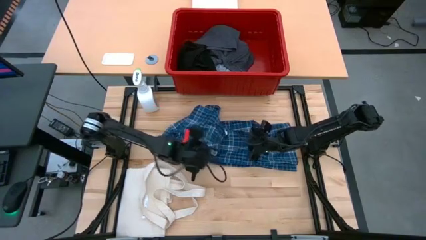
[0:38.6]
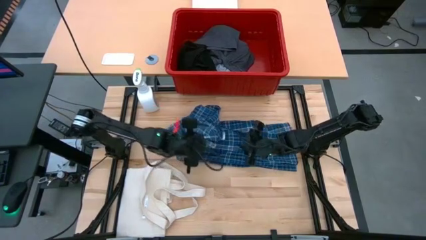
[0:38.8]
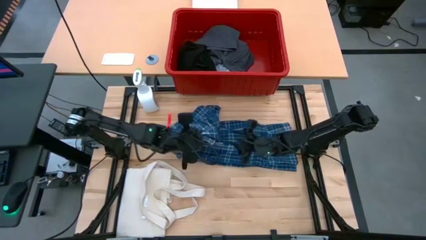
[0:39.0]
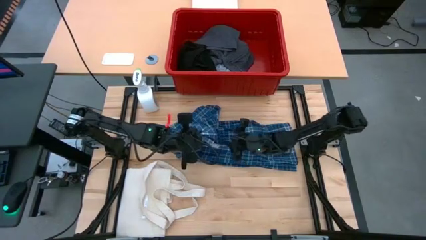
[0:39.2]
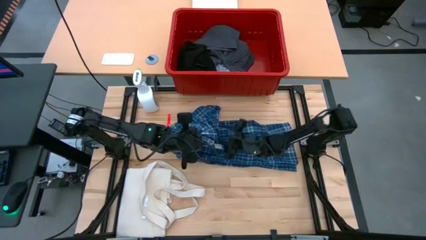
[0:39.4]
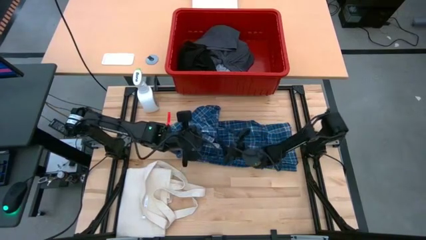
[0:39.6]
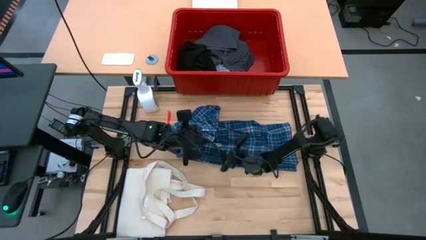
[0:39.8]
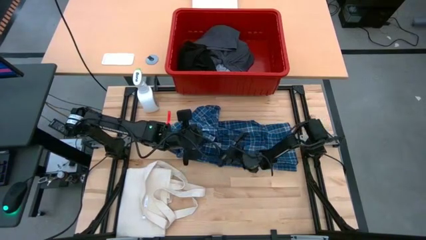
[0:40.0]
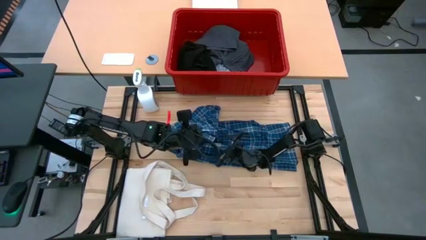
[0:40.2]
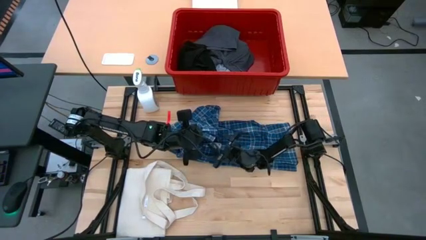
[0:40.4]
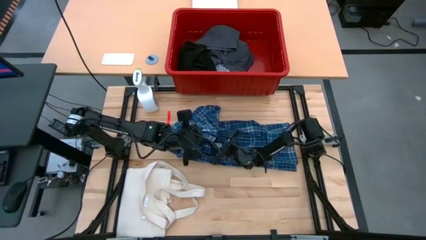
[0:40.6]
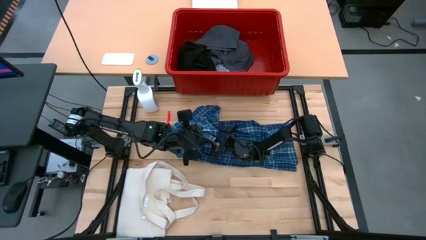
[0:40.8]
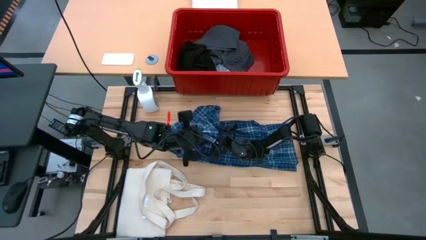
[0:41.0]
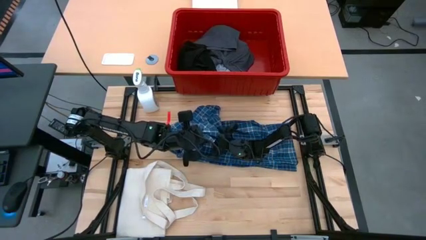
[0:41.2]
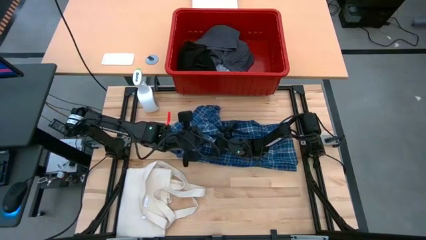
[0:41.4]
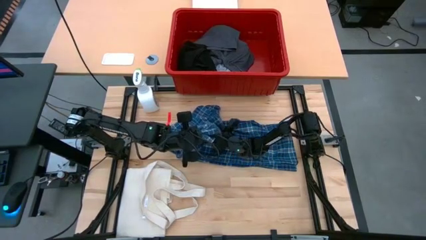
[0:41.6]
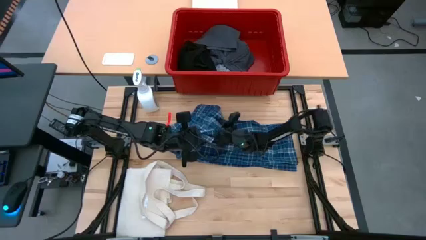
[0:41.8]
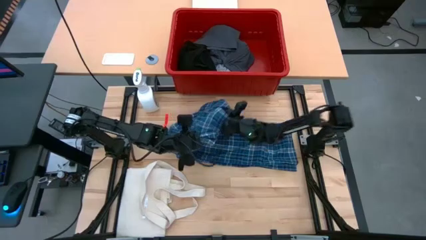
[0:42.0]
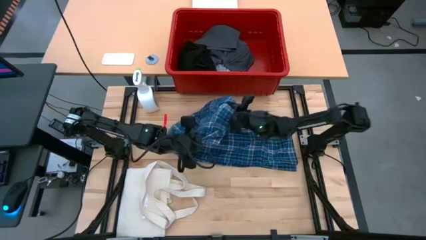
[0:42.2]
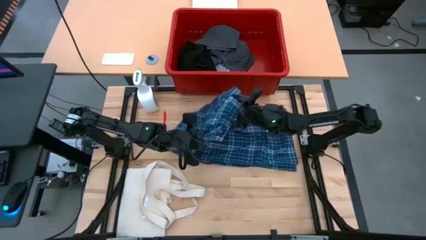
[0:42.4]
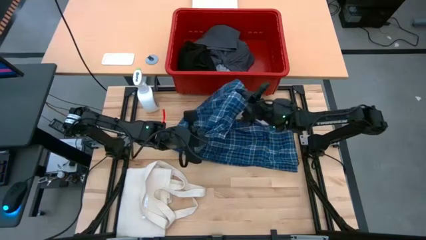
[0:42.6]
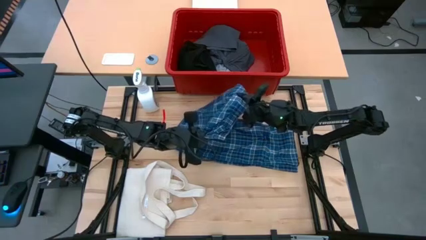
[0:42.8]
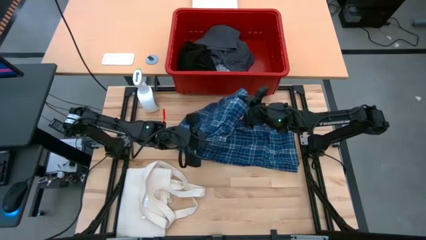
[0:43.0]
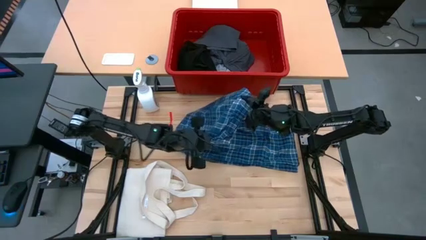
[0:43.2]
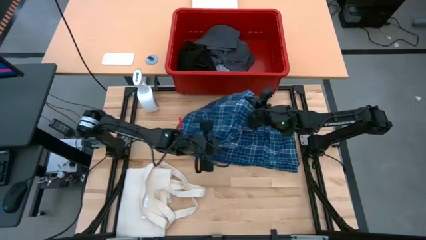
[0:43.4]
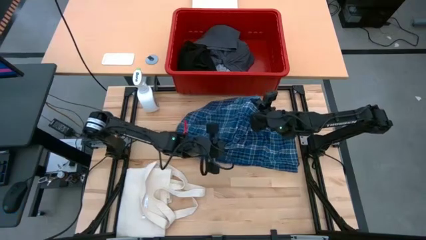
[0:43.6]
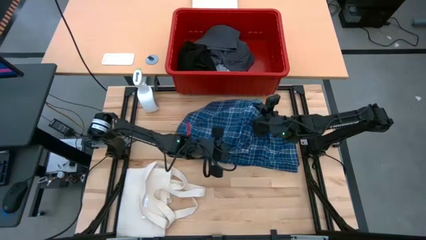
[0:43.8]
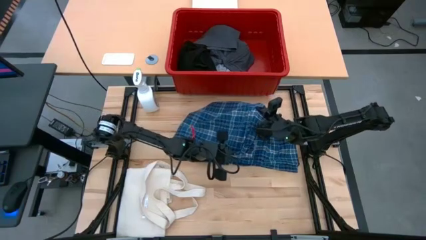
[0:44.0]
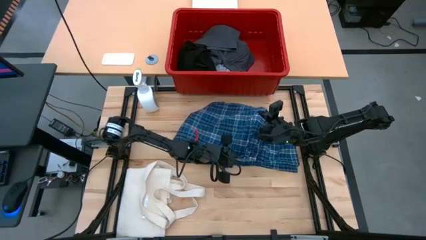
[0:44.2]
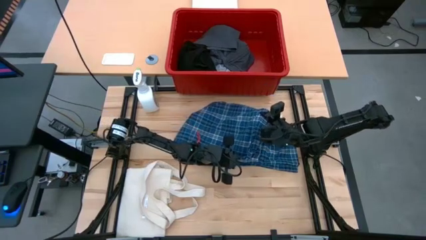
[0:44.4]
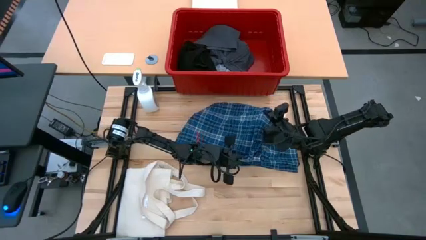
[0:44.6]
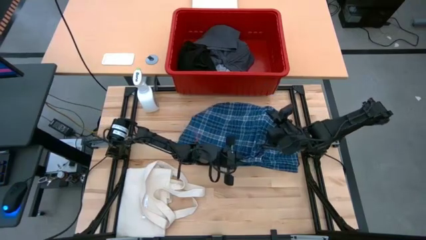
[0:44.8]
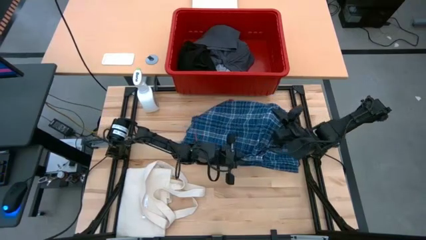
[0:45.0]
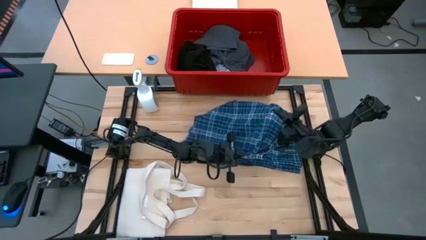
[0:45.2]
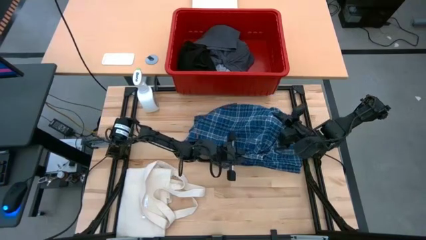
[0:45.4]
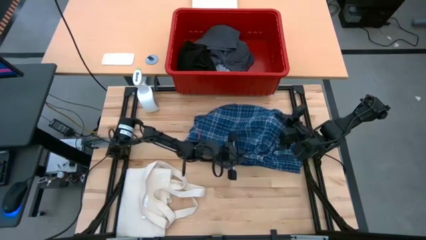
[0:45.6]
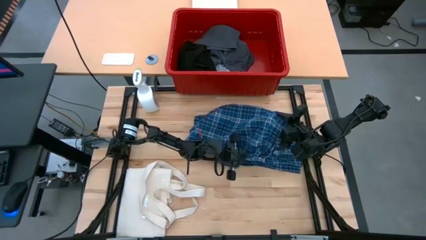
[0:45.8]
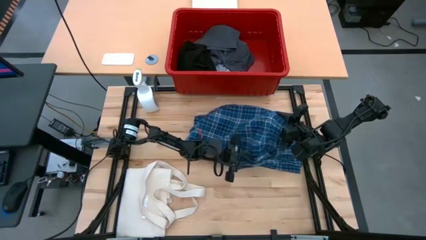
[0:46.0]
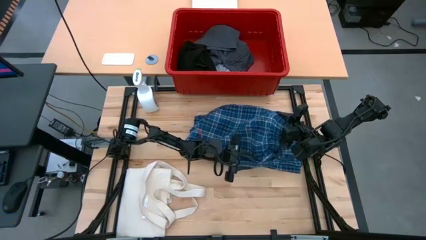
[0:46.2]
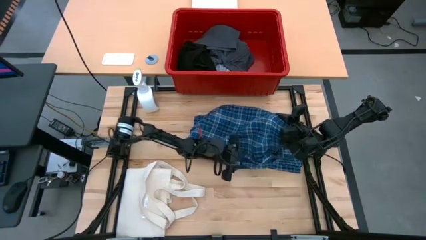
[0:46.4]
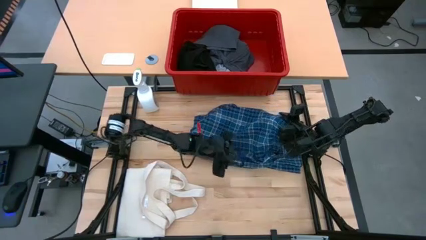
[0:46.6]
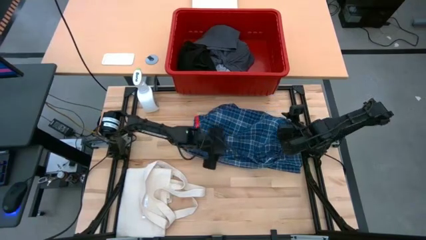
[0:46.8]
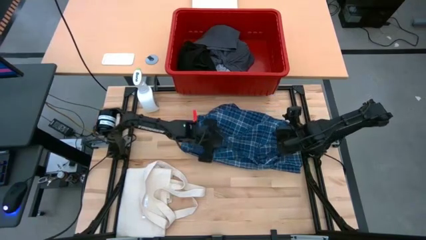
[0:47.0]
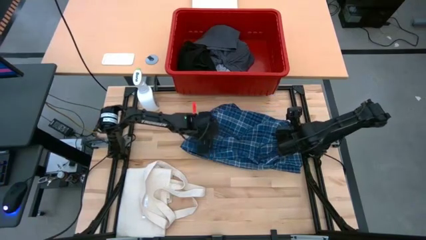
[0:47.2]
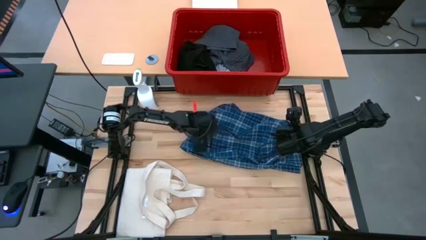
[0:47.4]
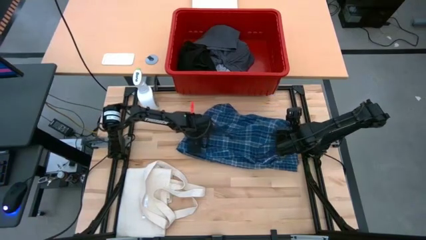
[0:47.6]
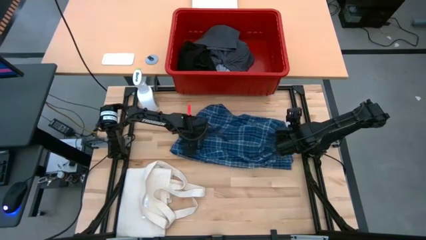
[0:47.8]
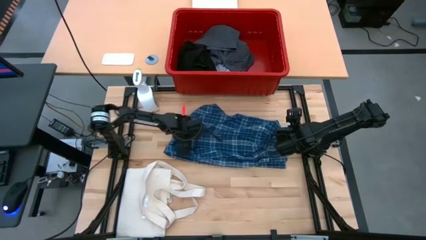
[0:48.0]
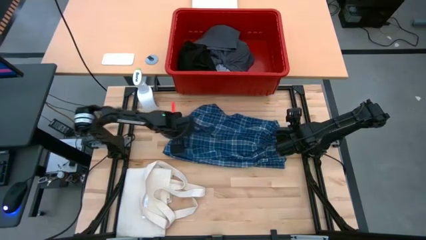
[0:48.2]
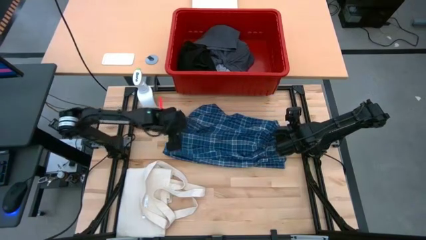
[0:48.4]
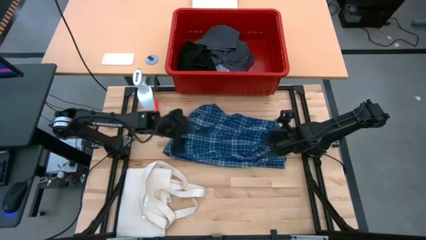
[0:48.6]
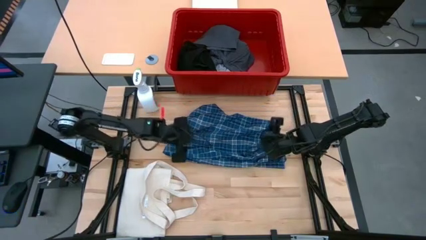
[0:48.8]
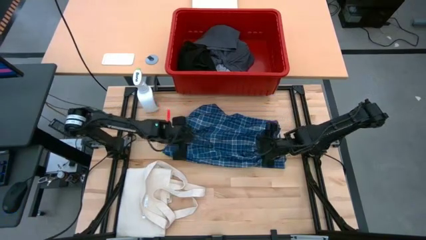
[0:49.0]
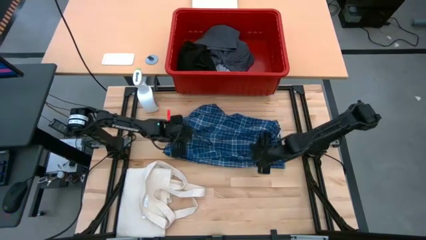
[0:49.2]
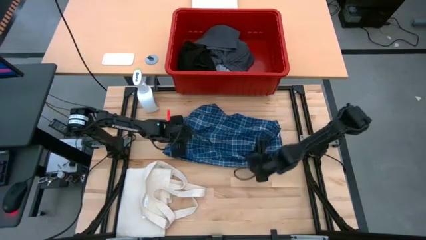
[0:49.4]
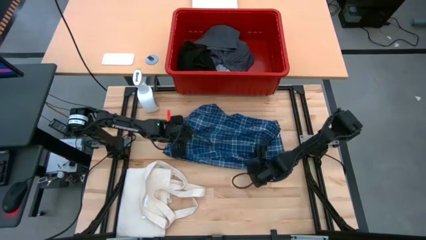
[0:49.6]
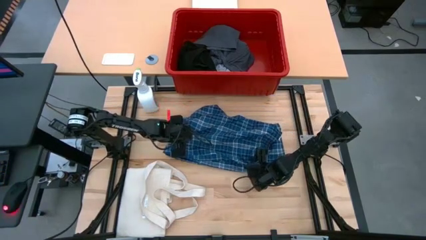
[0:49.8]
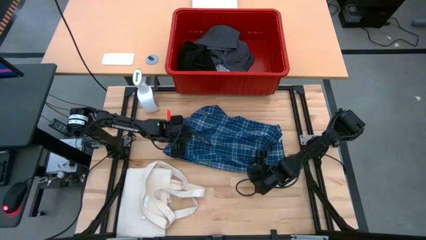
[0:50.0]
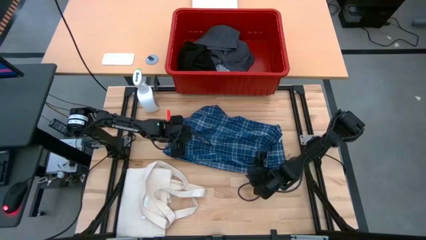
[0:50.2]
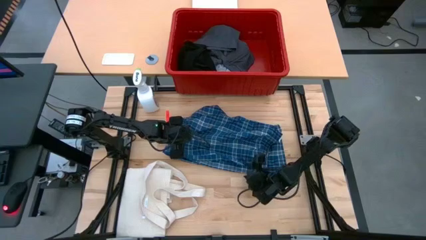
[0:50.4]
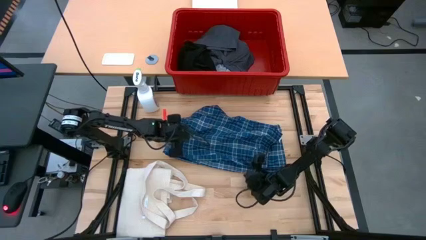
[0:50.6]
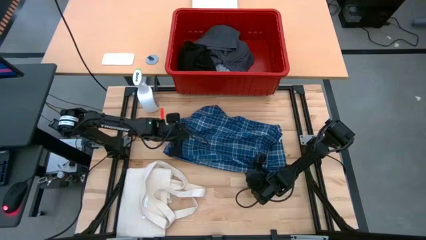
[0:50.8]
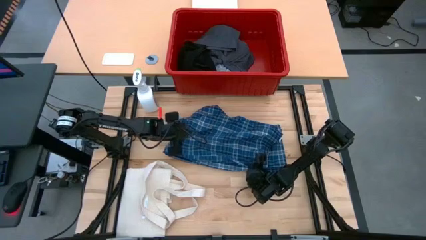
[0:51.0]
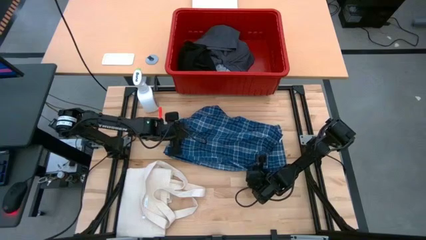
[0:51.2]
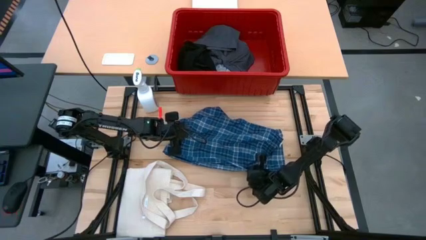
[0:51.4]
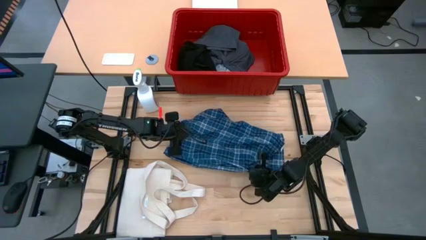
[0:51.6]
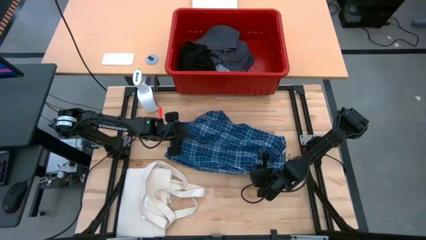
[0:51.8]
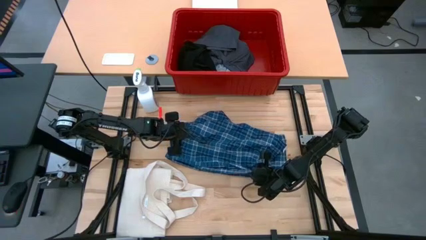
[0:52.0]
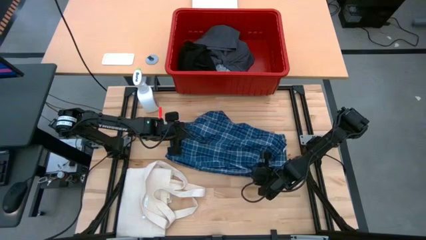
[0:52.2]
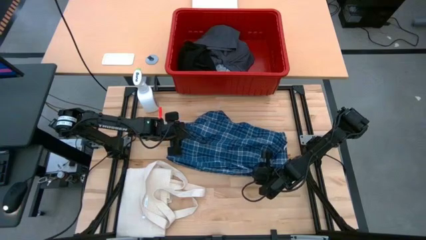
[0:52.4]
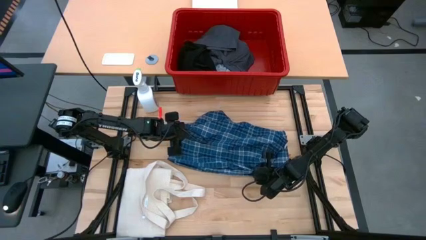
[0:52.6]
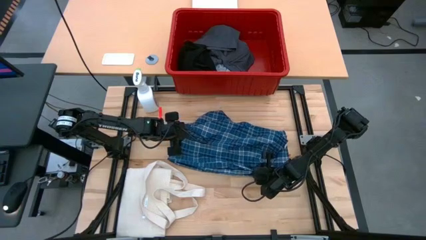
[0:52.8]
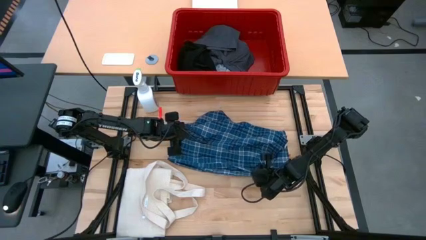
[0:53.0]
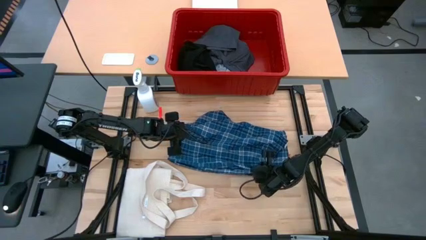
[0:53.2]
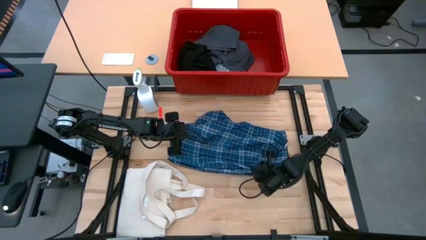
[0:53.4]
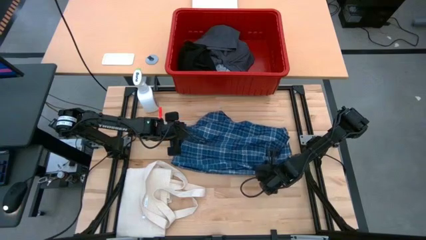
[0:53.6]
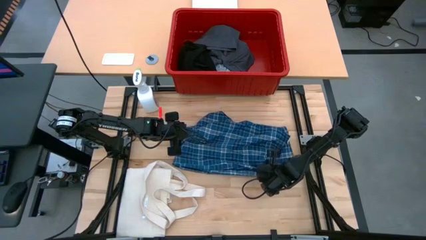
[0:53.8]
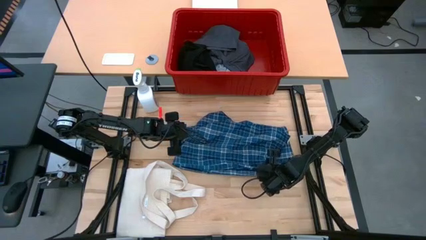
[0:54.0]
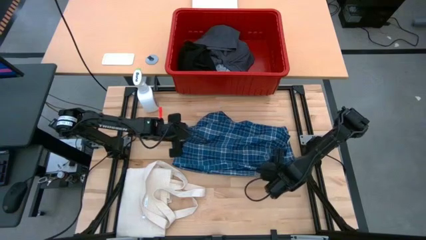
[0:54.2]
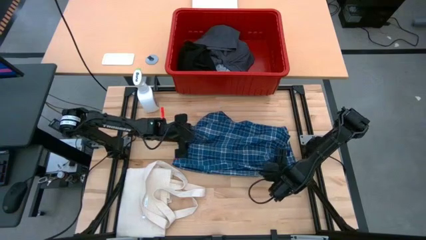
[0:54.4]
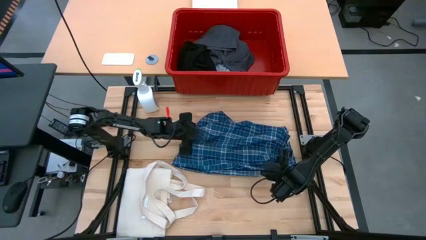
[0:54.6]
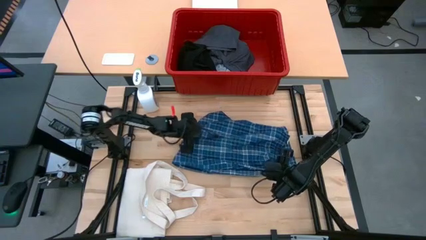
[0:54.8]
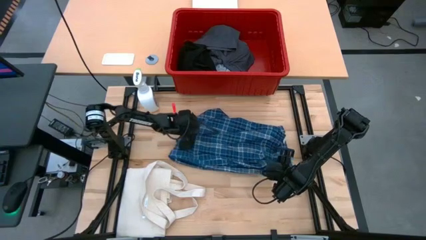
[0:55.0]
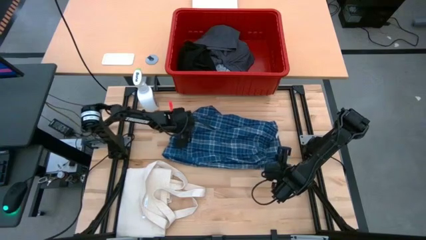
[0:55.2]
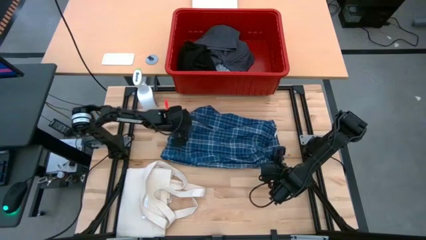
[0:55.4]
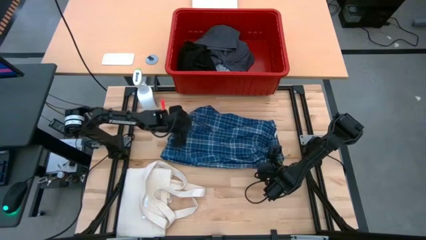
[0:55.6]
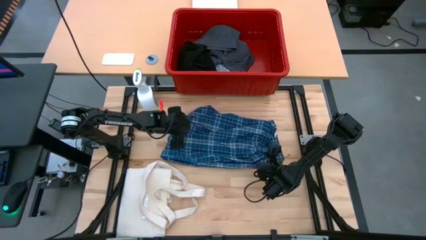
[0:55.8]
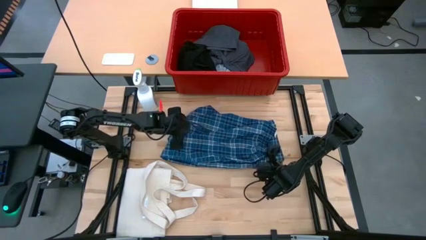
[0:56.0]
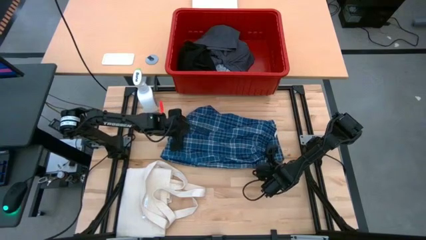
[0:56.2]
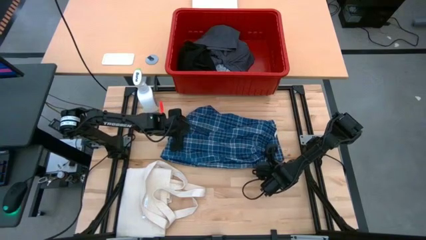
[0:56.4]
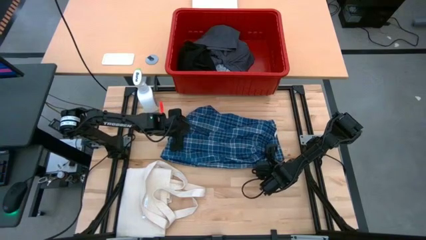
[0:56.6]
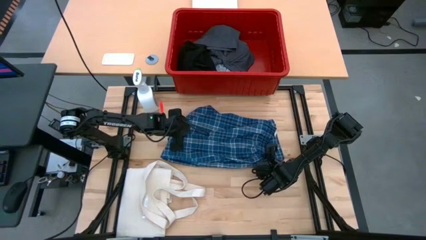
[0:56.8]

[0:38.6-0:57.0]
Task: Fold Laundry from Bin
Fold the blue pants
